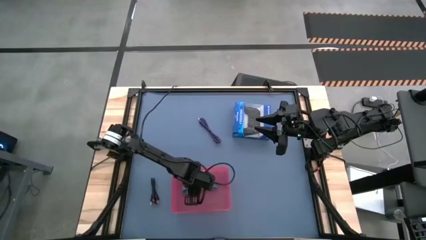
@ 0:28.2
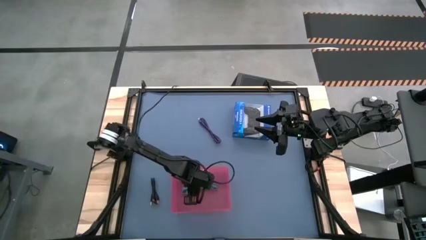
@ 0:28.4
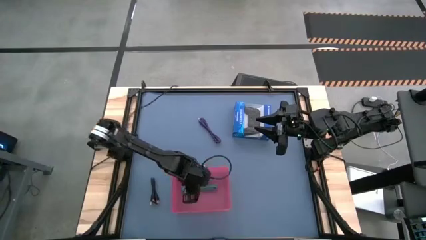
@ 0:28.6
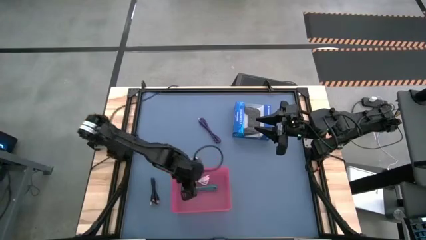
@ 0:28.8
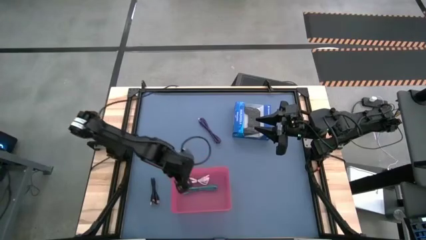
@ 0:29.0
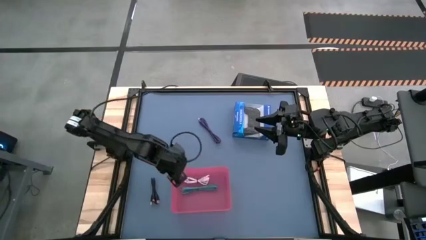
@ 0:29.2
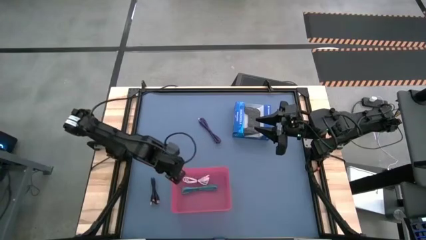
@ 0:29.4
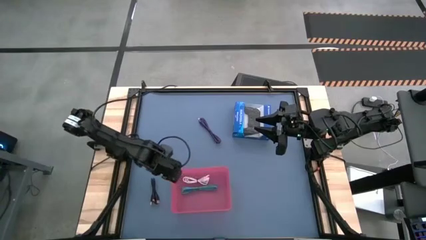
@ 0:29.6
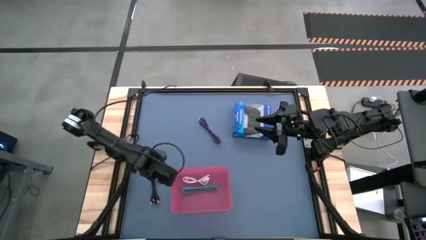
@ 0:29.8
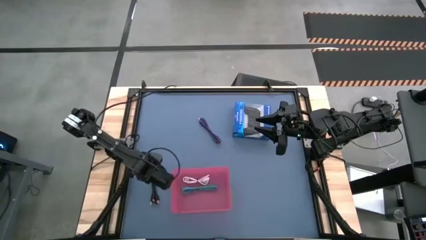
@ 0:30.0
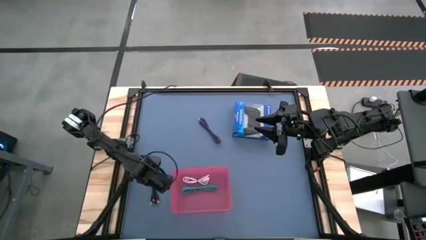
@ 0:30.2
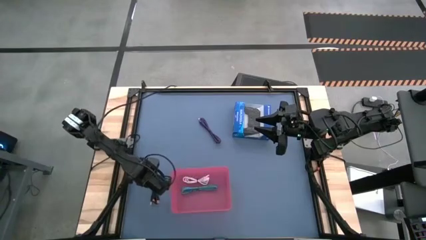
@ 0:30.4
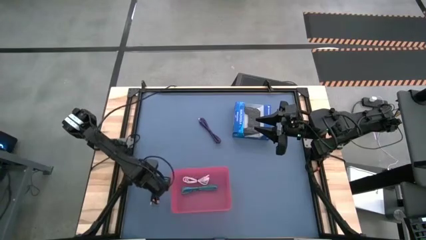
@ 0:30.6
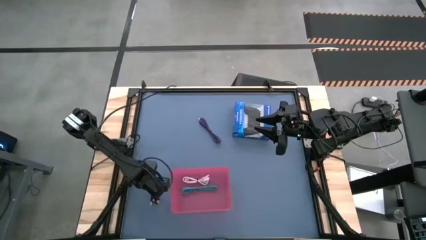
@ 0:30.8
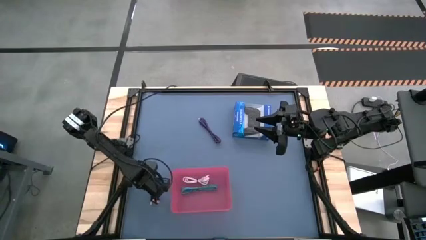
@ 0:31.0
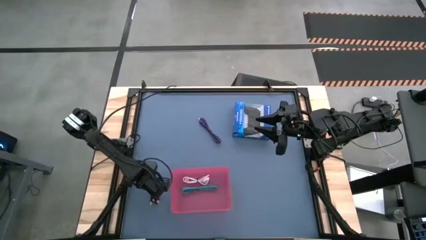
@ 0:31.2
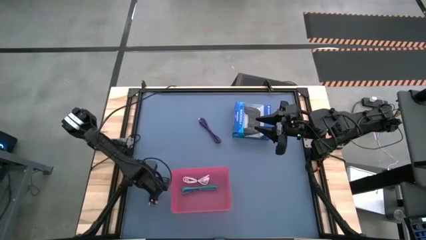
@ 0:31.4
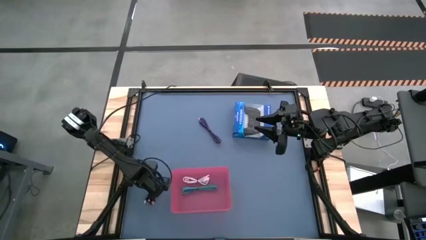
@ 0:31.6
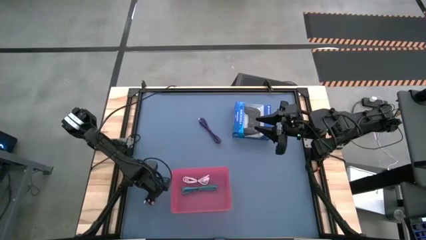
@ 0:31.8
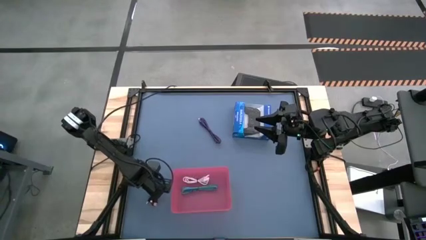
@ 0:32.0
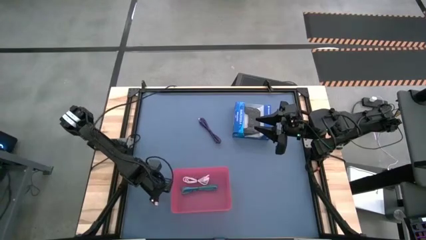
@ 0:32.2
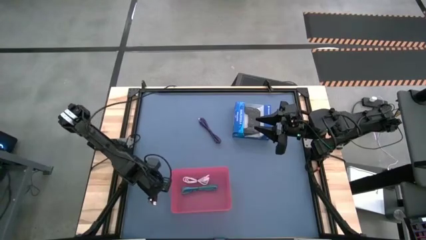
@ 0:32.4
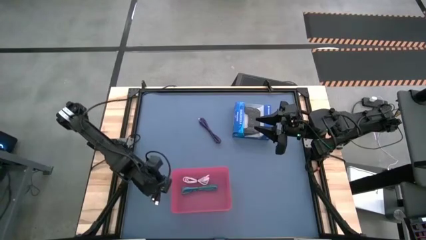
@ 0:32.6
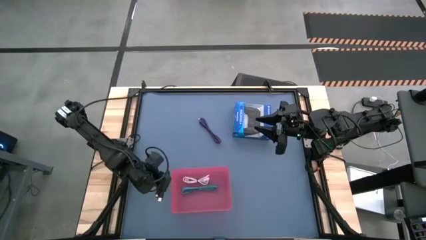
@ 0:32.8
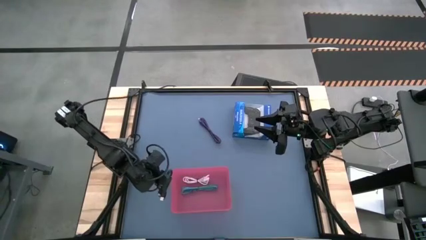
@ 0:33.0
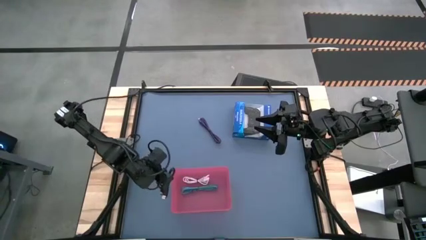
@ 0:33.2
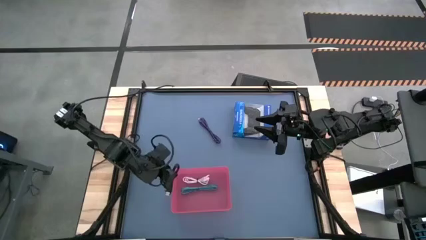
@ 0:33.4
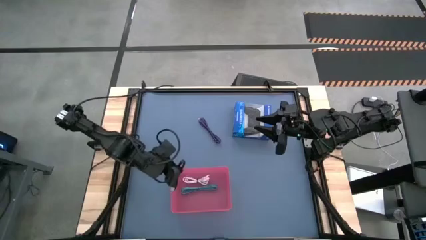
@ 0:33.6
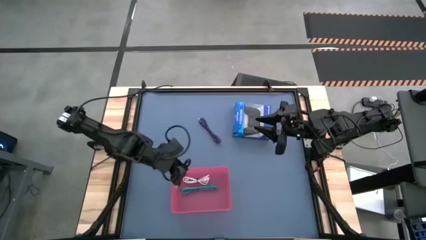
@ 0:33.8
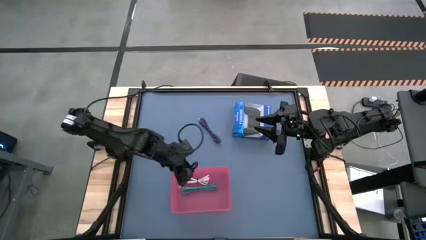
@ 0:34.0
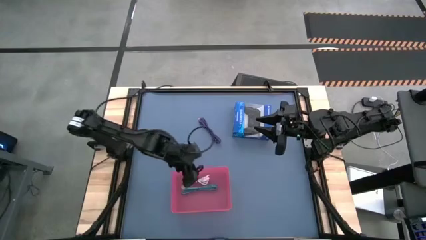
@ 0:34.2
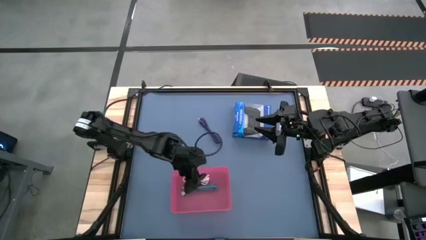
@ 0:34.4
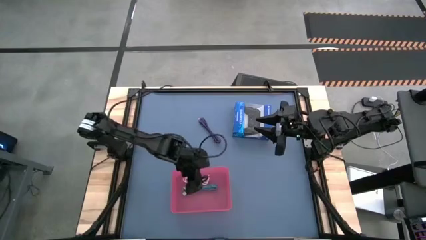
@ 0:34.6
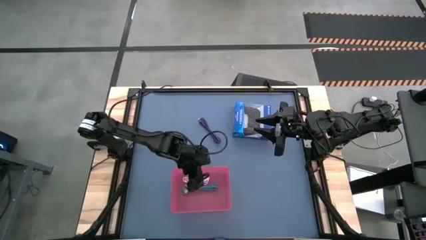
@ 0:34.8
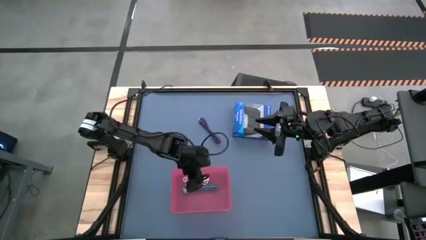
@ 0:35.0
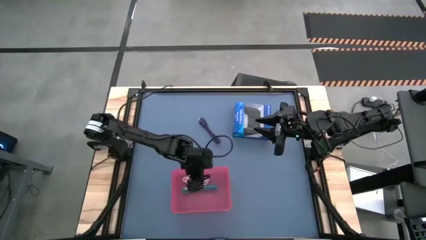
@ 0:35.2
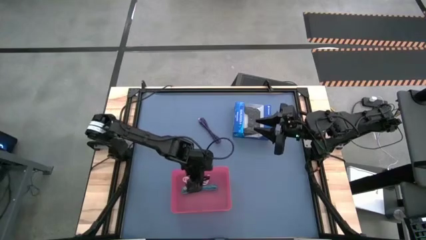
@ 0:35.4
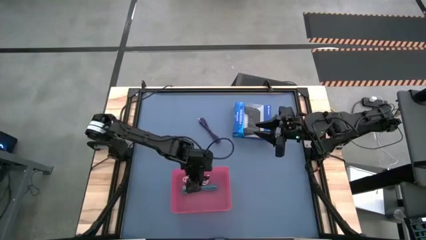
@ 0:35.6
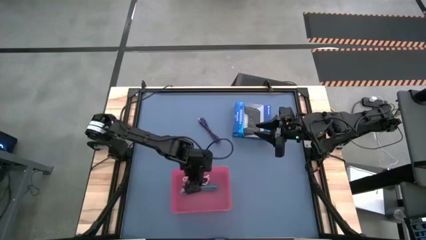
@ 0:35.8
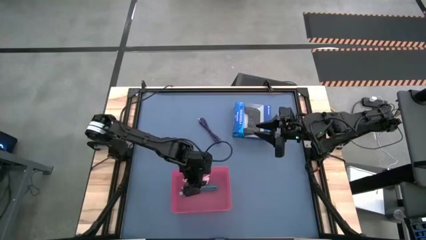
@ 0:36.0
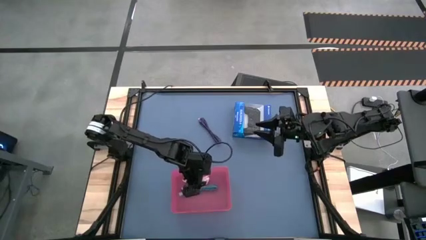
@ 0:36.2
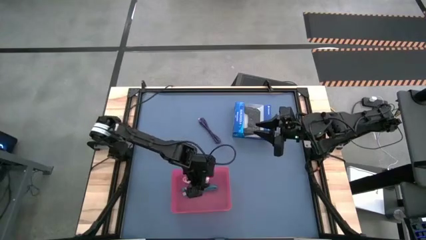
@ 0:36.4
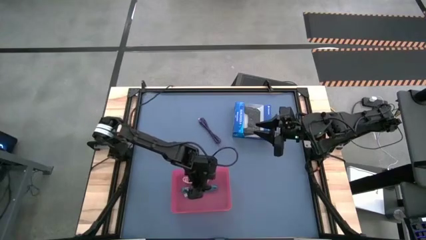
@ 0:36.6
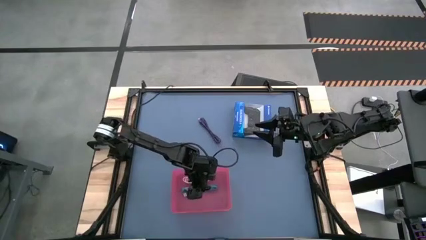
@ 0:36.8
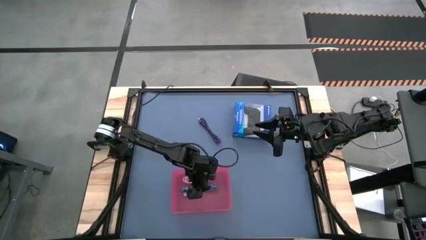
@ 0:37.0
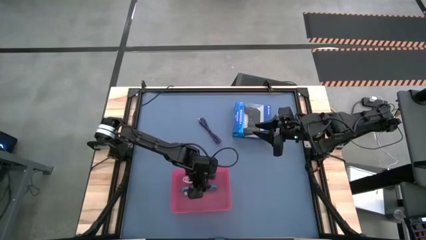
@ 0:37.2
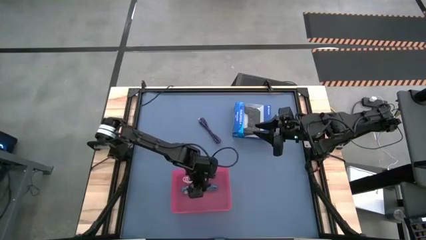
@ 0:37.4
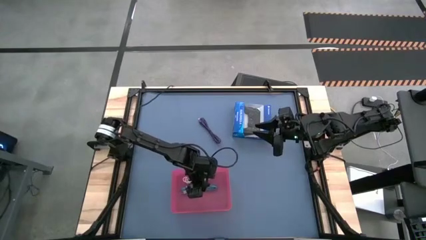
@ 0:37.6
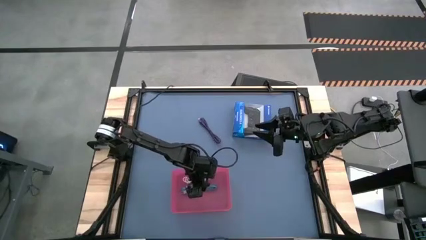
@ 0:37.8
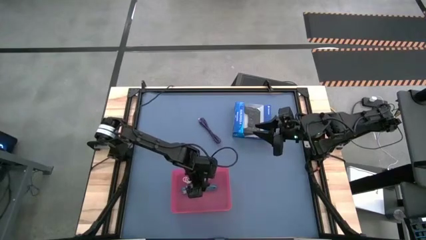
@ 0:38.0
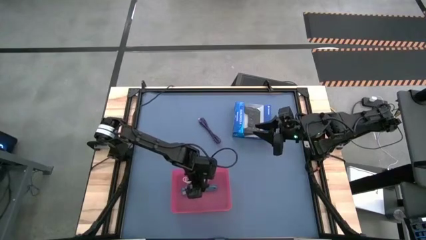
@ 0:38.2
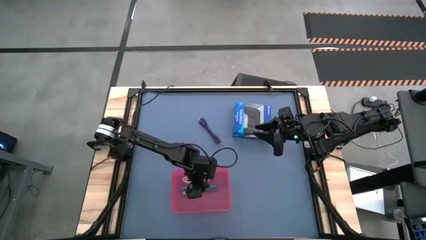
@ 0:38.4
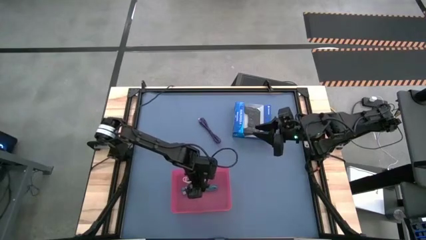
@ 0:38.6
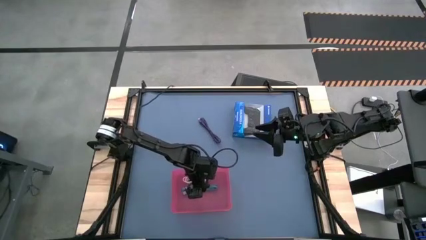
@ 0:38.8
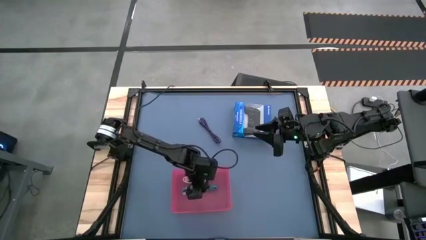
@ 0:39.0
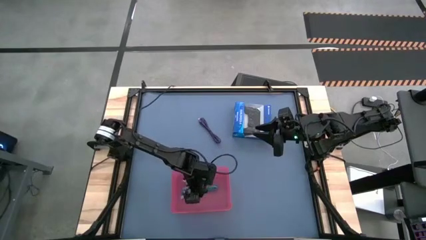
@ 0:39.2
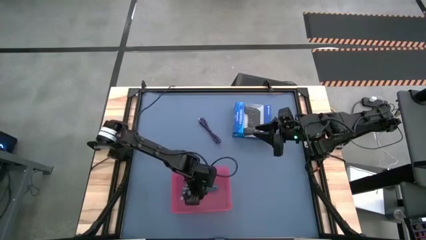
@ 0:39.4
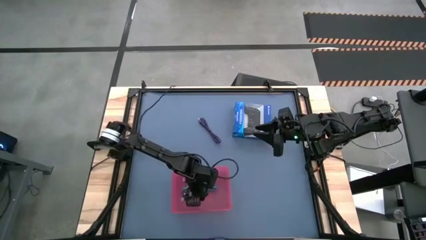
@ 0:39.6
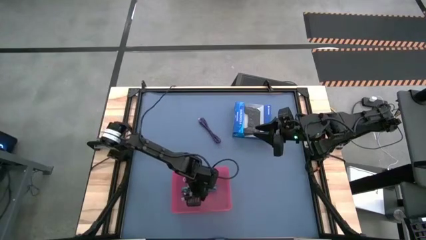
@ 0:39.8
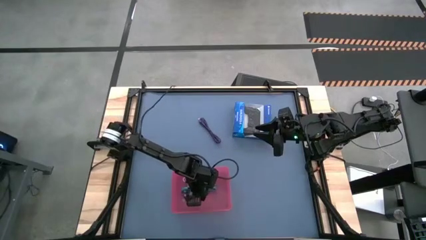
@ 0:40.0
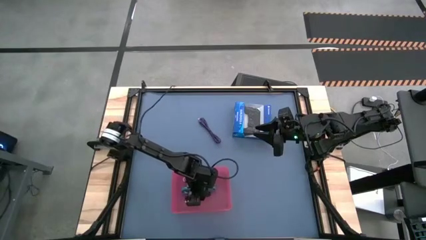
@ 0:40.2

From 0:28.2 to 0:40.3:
Task: Pick and place USB-C Cables
Put the black charger cable into the pink bin

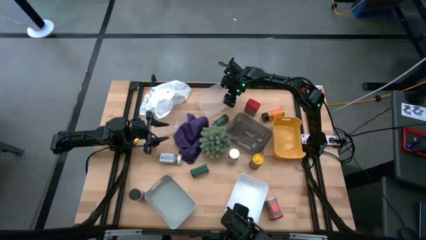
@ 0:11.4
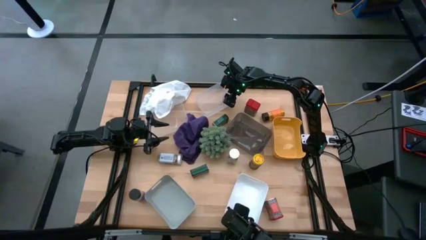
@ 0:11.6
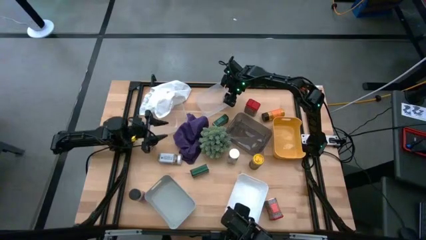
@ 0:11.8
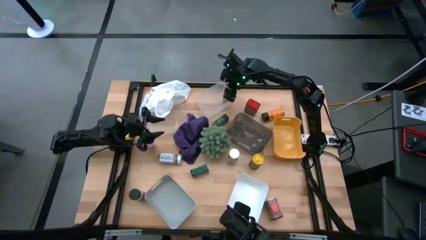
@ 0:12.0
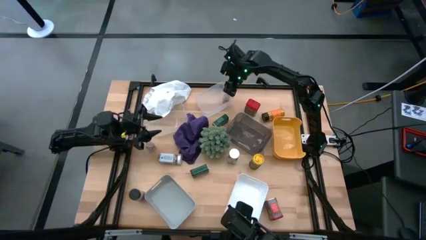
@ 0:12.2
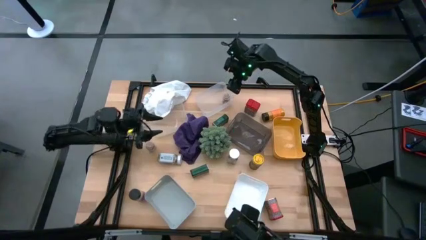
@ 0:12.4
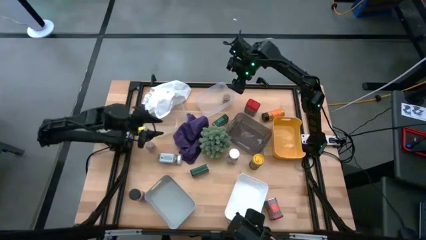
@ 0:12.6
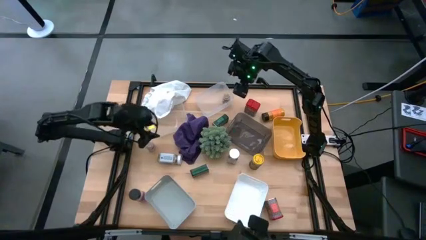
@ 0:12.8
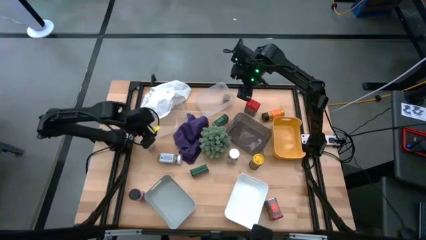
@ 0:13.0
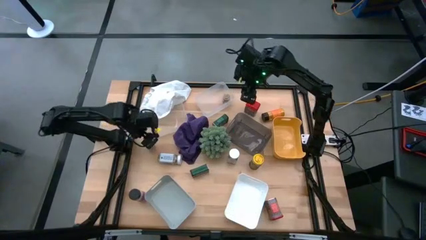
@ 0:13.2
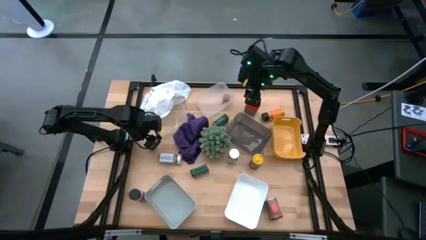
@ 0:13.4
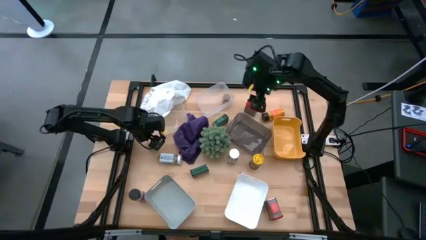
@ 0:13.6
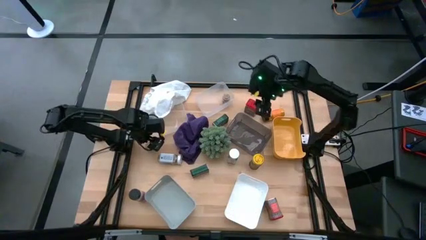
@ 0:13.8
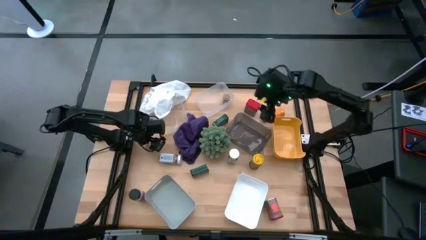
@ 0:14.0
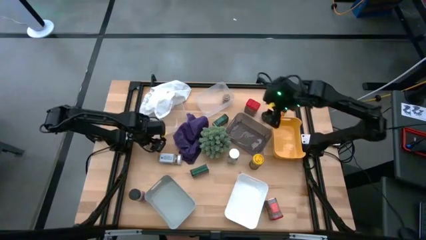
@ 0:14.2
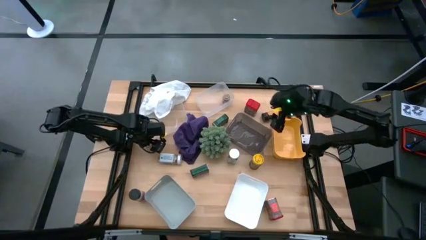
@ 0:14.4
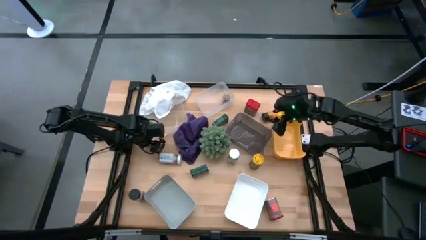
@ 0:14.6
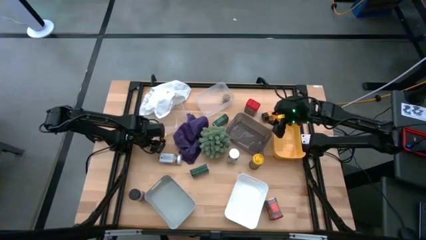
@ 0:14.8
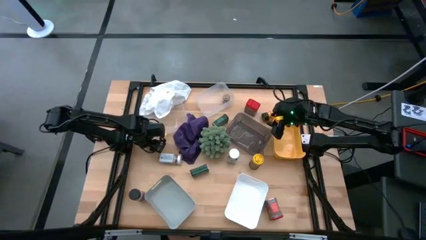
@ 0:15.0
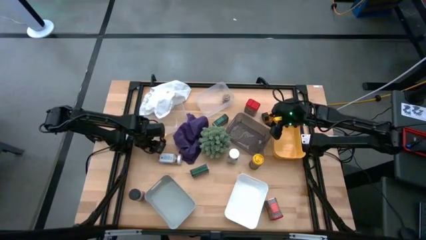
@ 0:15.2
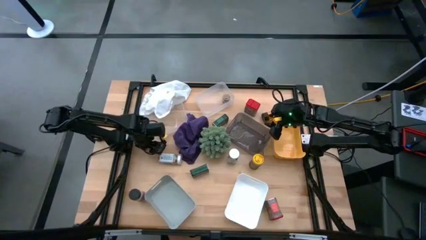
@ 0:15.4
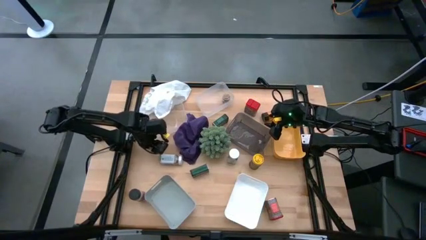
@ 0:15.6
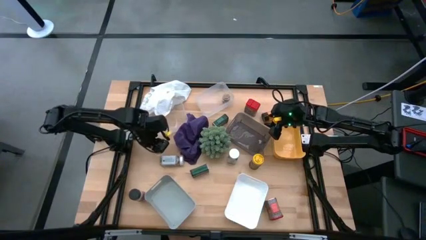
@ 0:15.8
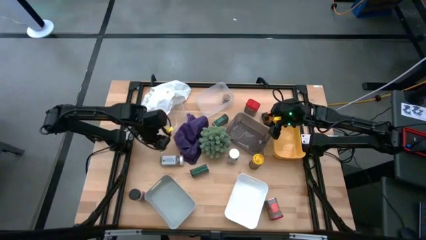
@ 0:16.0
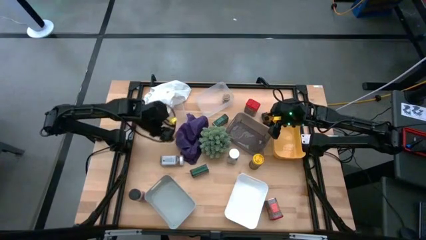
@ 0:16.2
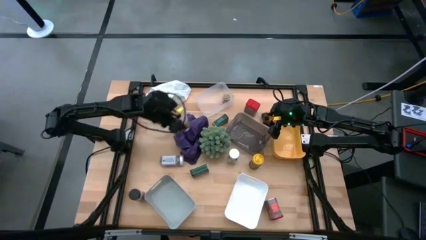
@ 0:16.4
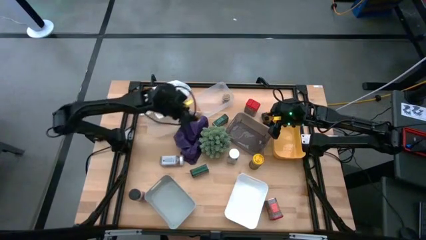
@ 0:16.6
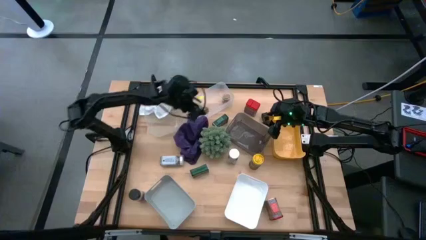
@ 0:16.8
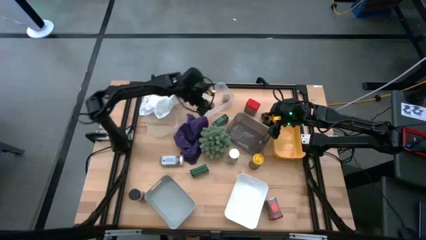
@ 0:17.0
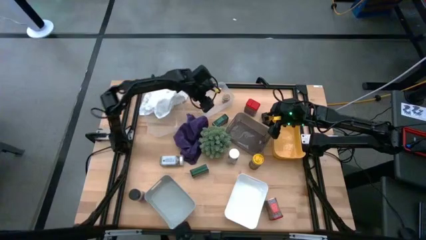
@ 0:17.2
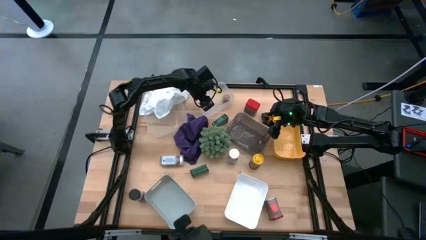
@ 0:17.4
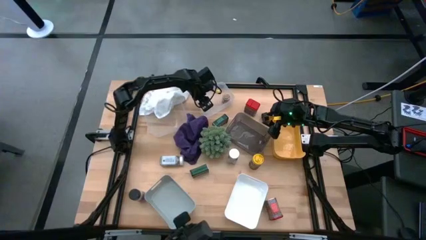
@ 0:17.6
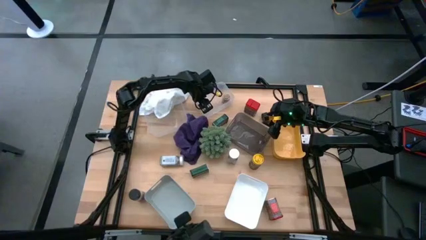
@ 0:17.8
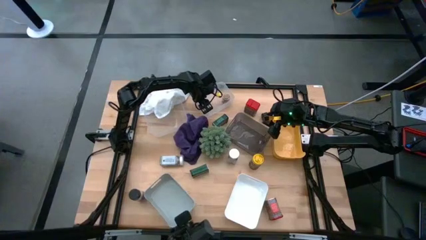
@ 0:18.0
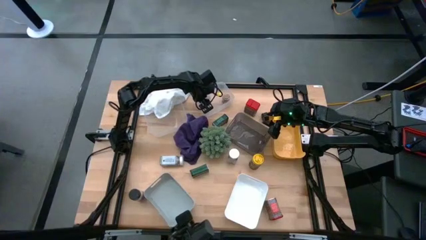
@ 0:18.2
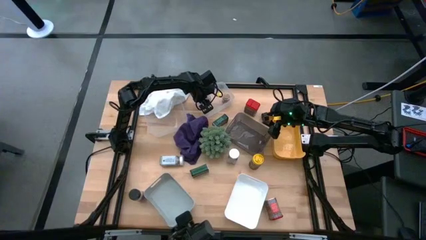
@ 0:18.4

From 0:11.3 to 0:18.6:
Task: Sort spices by type
Put the brown seasoning bottle into the right transparent bin
